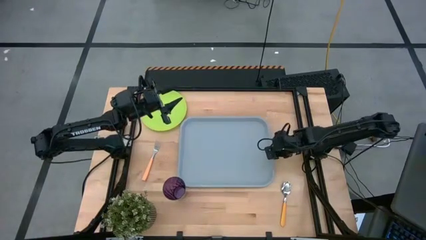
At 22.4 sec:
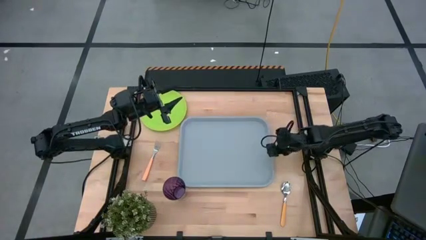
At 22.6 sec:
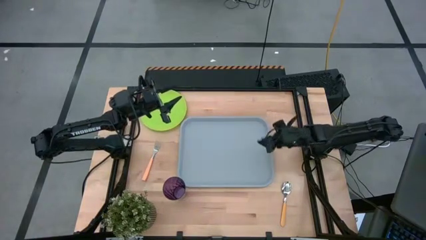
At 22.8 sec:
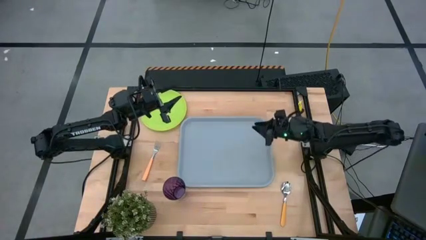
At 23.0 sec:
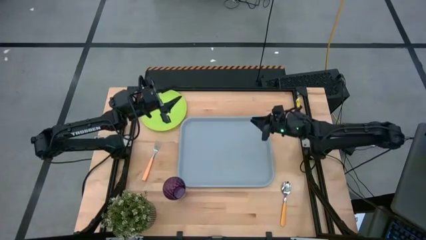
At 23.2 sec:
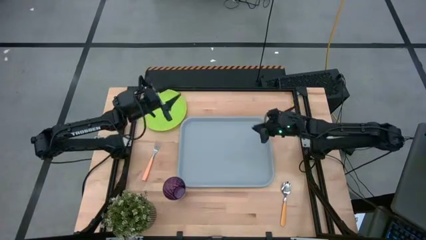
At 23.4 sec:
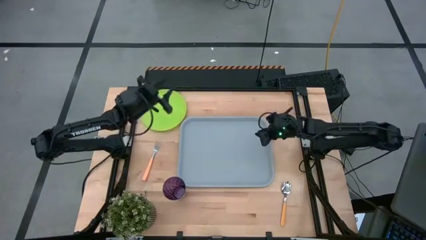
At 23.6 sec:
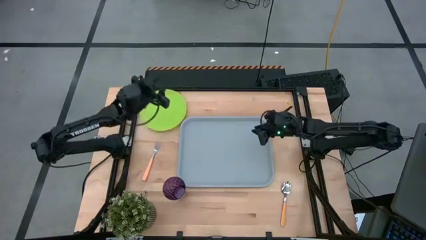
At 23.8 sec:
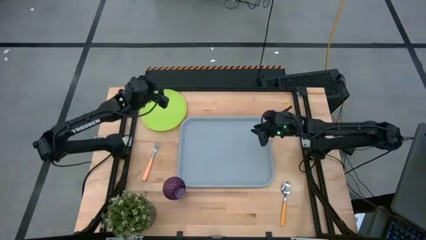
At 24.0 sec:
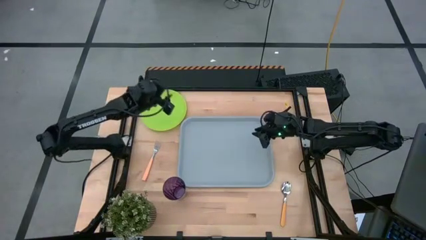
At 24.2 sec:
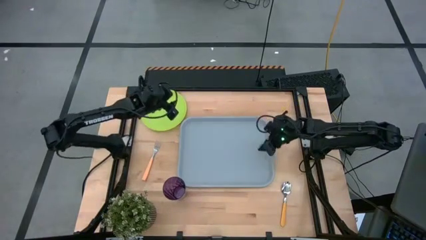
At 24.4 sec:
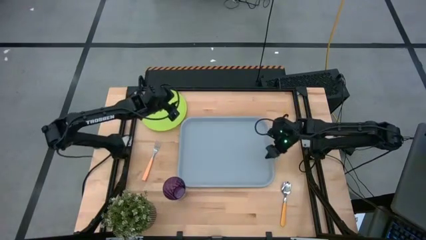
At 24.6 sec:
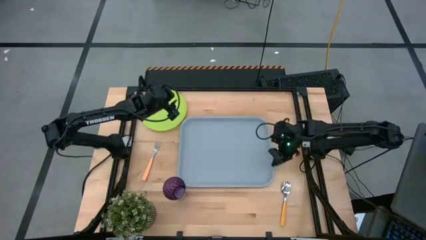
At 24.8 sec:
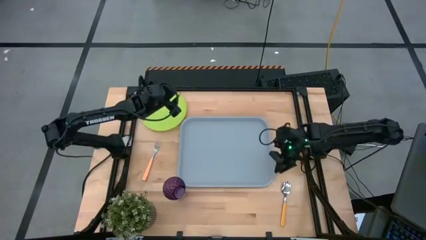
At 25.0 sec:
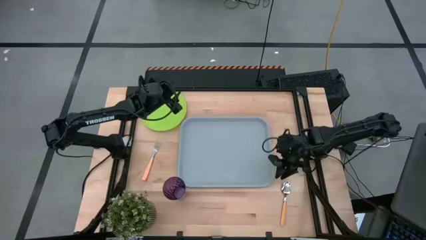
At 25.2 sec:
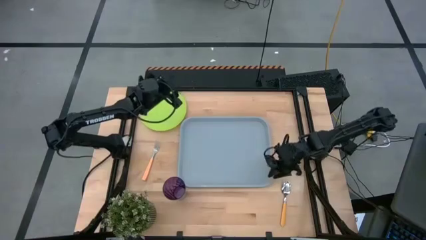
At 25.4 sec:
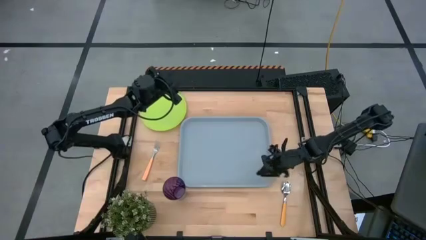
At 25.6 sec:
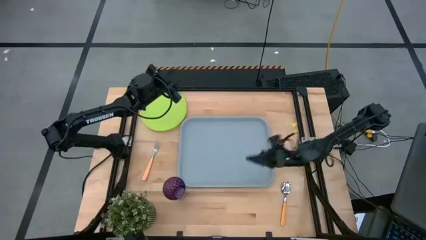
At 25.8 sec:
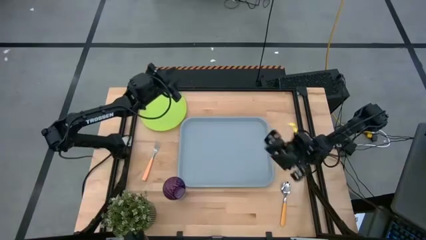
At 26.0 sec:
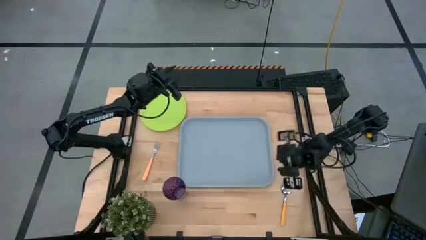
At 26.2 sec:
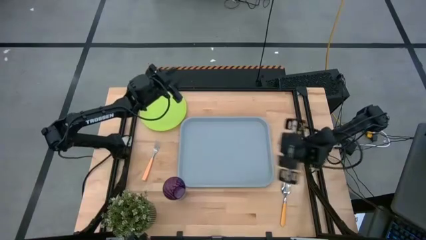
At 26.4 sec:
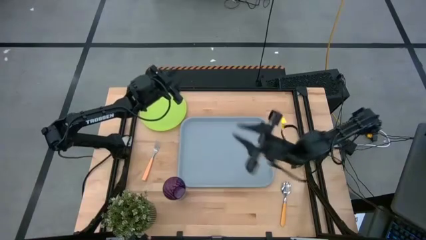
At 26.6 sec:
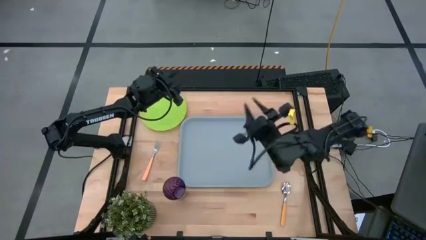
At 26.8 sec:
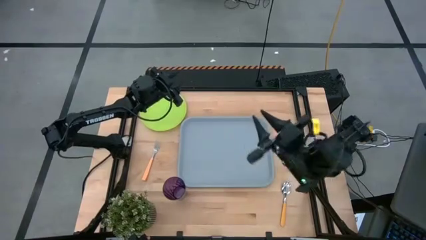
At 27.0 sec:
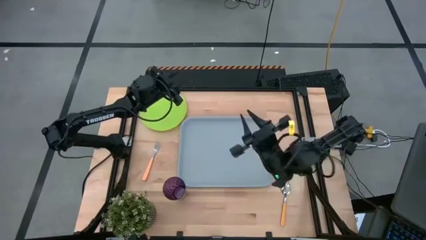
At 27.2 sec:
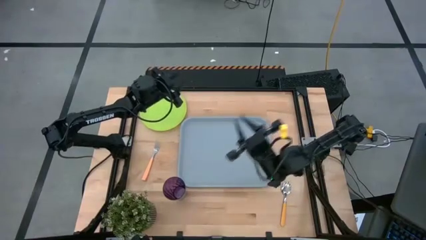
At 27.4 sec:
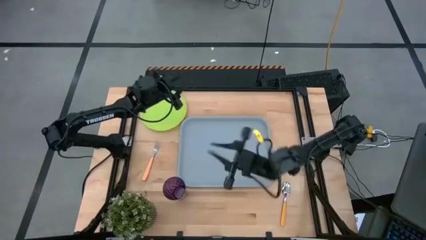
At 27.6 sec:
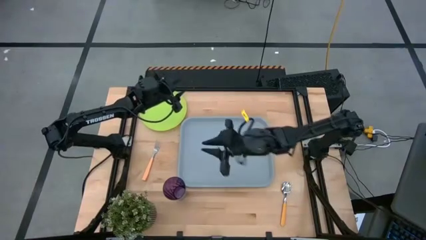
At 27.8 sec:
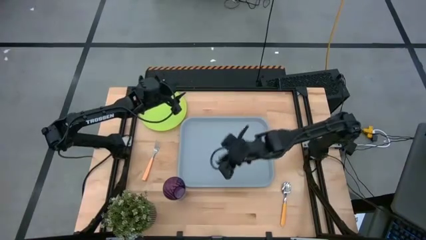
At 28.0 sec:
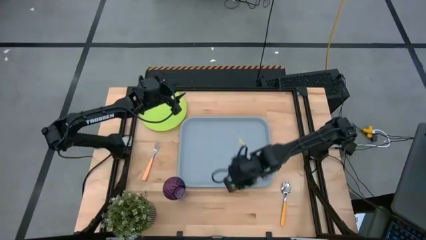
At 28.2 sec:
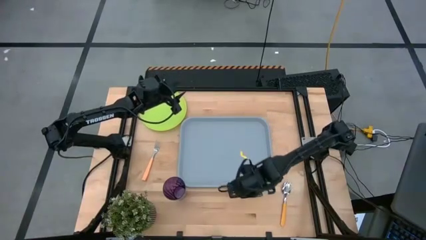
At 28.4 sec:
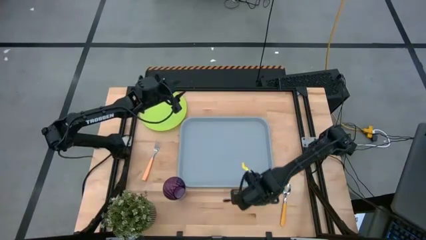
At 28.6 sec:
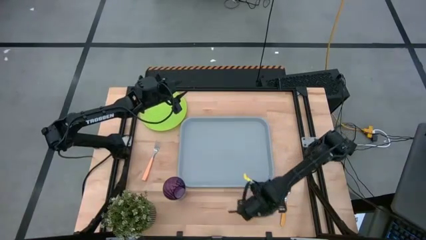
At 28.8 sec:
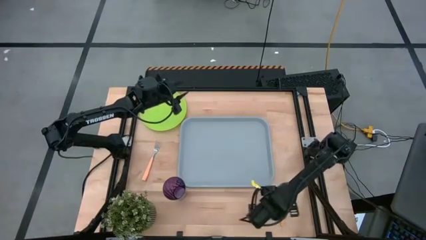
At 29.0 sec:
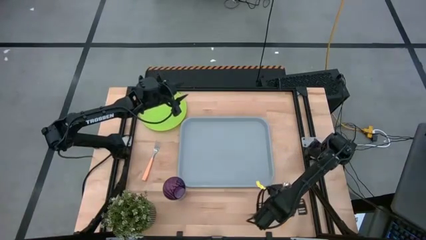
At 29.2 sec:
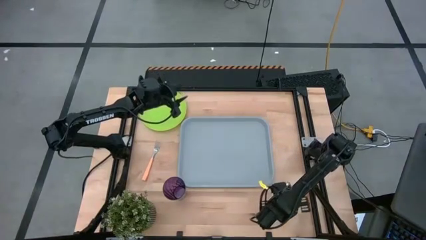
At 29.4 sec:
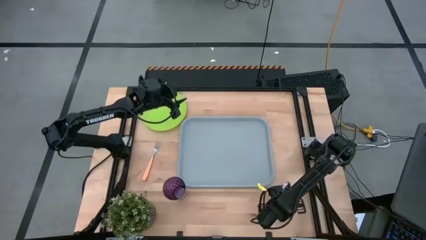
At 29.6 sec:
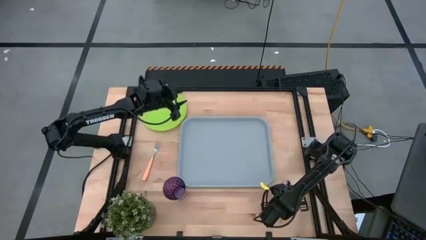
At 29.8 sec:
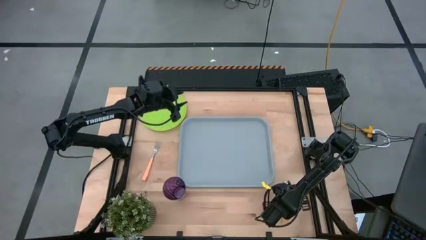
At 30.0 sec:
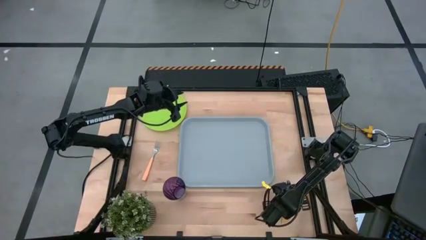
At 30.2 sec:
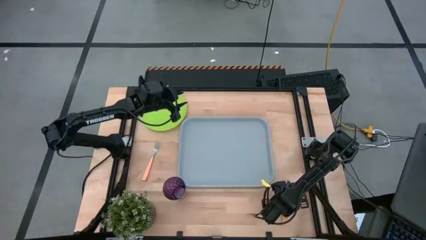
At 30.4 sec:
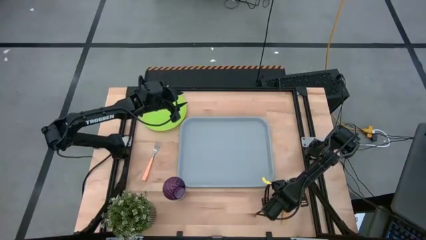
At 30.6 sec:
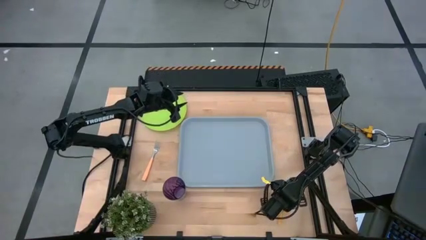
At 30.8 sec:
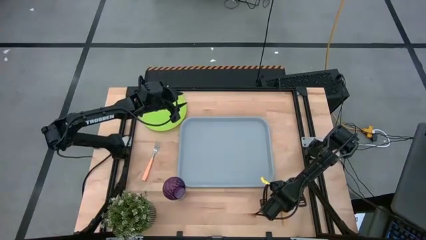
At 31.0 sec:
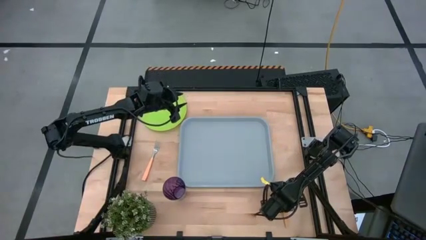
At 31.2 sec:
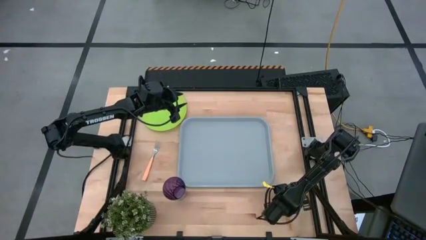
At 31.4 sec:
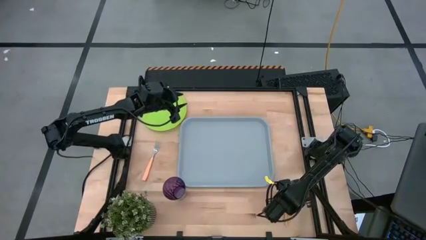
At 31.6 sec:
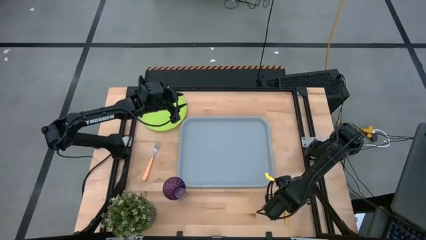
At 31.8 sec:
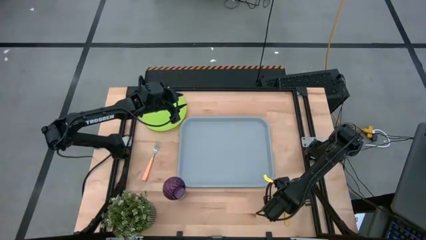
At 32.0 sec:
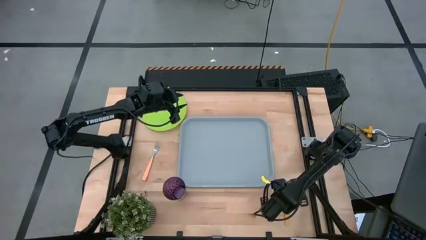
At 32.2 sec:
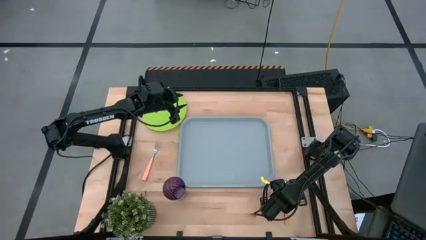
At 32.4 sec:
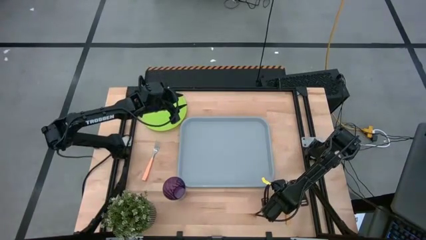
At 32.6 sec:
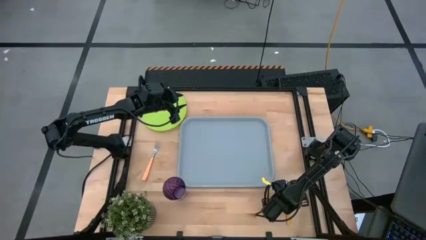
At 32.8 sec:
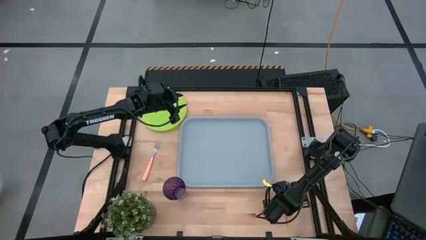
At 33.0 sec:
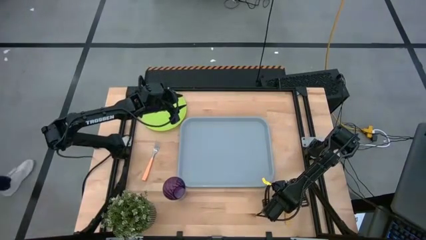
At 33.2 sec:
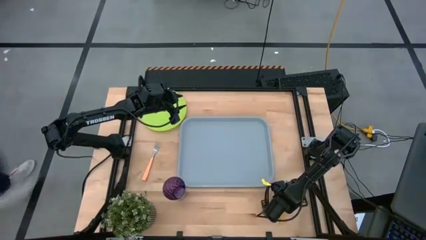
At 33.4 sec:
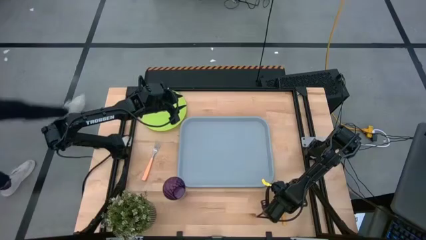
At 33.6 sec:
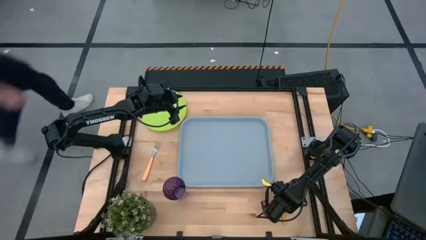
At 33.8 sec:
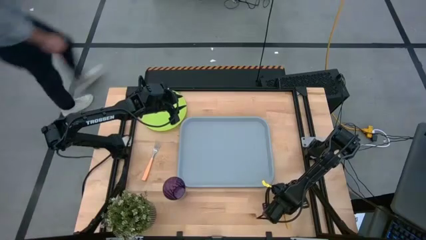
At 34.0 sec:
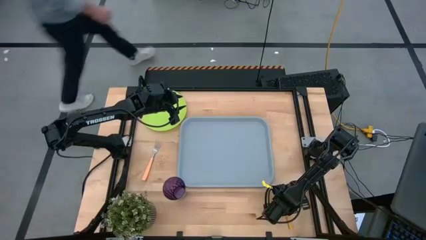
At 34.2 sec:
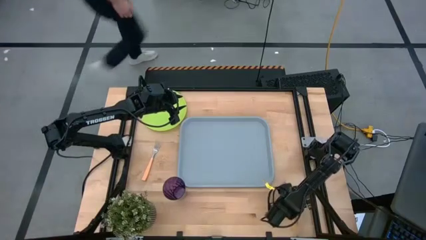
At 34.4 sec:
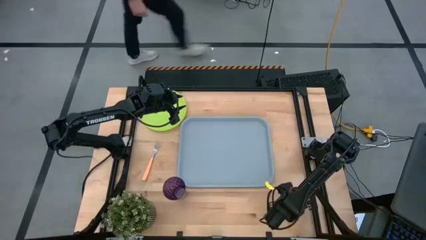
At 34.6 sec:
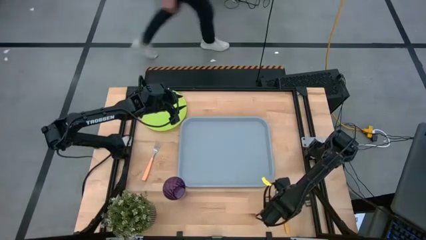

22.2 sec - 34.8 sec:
Task: Pick and place plate/cup/fork/spoon on tray
Put the orange spoon on the gray serving tray

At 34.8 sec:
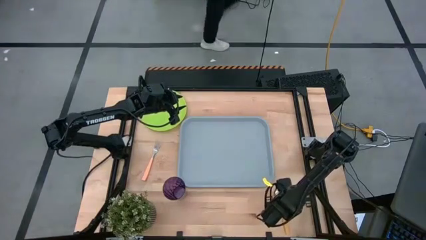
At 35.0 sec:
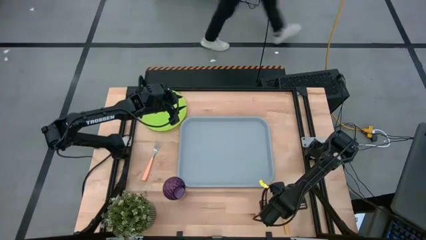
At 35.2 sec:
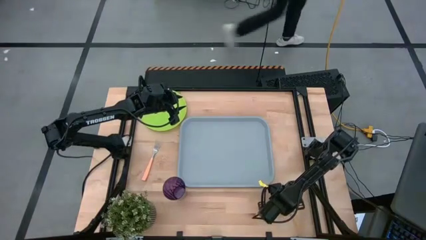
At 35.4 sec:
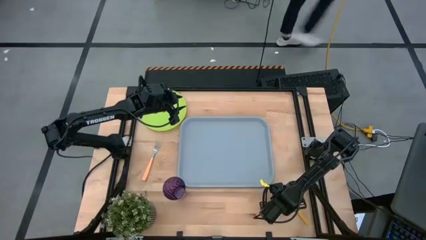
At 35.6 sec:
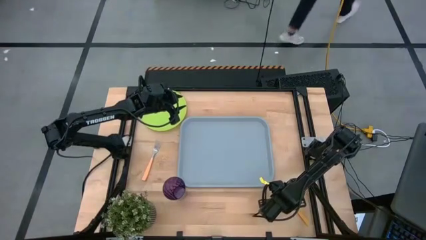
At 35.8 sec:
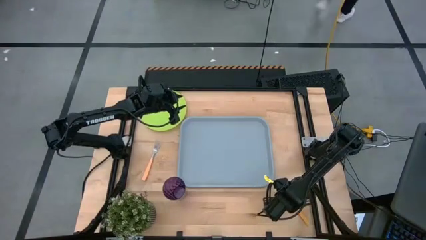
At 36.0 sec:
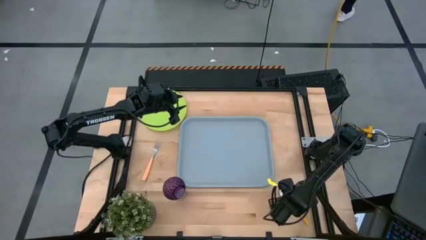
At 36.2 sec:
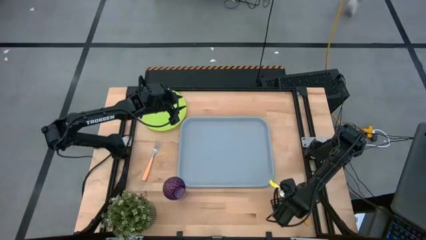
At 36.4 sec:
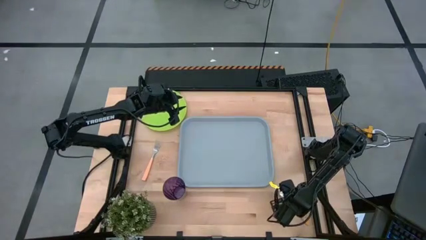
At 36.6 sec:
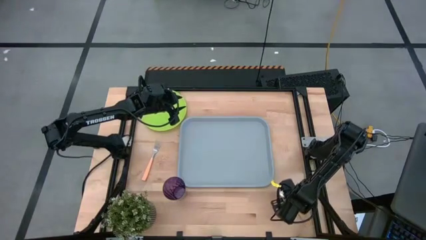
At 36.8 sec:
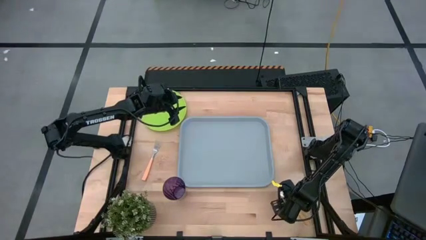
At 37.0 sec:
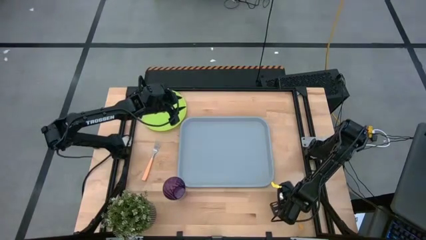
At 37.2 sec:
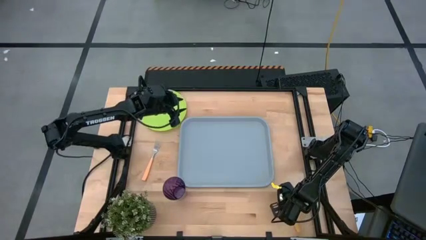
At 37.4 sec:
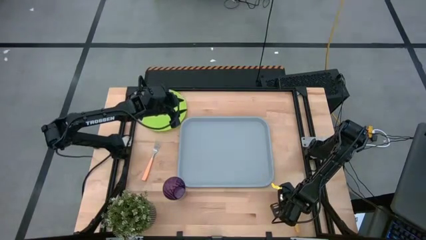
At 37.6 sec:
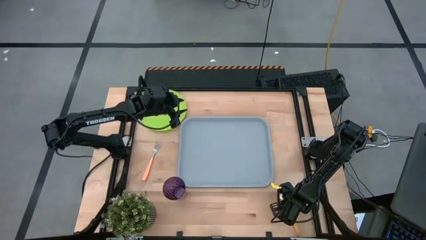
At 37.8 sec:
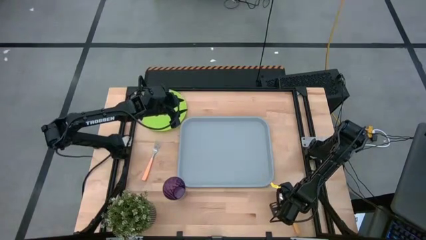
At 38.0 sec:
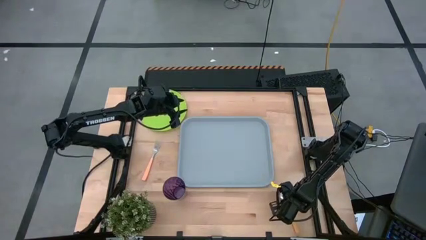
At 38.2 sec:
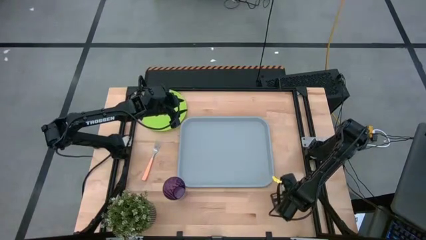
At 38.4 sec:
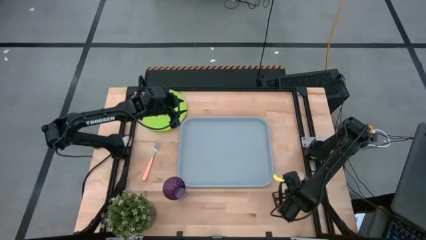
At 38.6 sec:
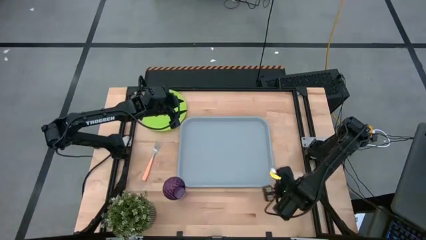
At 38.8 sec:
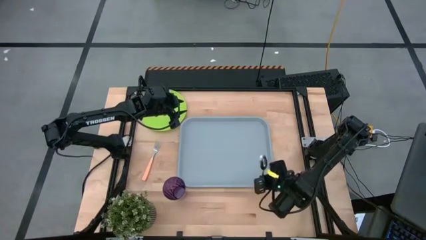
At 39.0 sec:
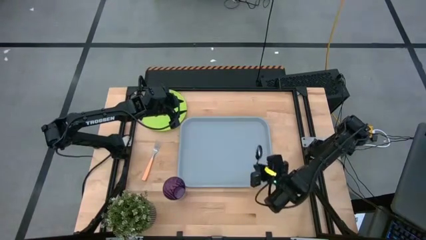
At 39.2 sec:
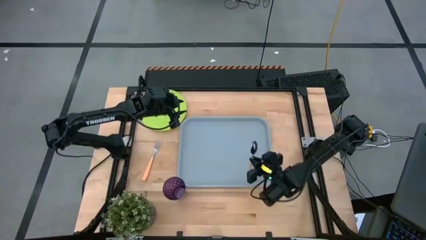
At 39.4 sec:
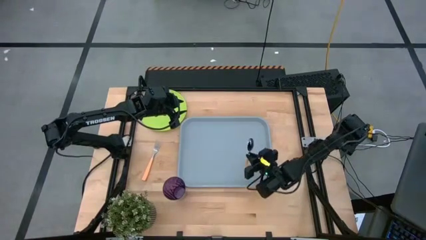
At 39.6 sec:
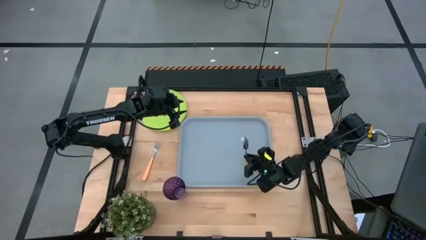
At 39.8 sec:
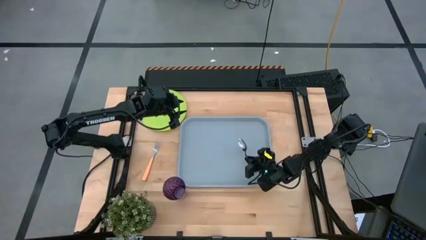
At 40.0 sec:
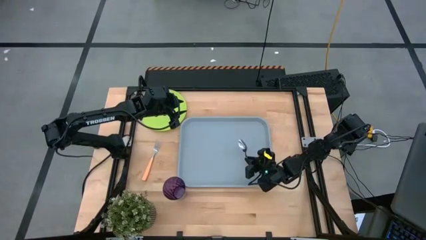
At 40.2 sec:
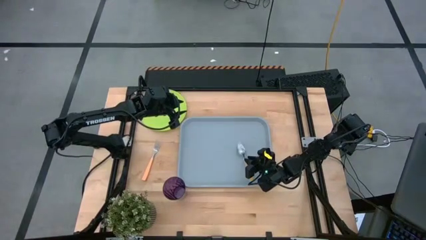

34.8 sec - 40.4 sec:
Put the orange spoon on the gray serving tray
